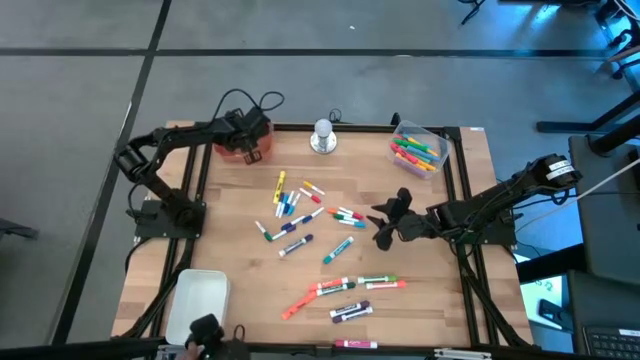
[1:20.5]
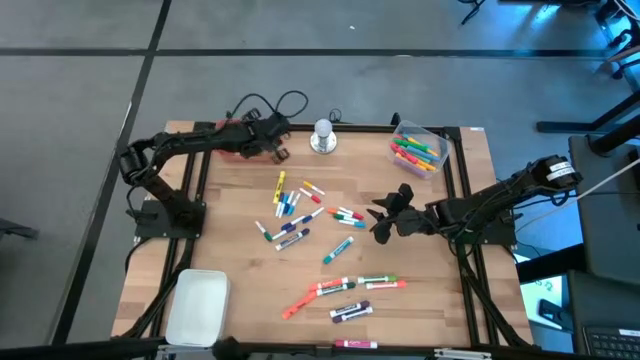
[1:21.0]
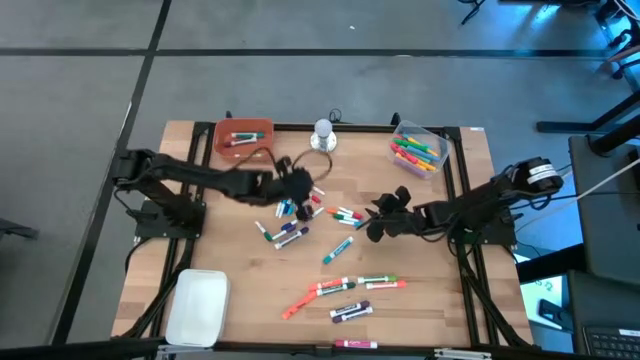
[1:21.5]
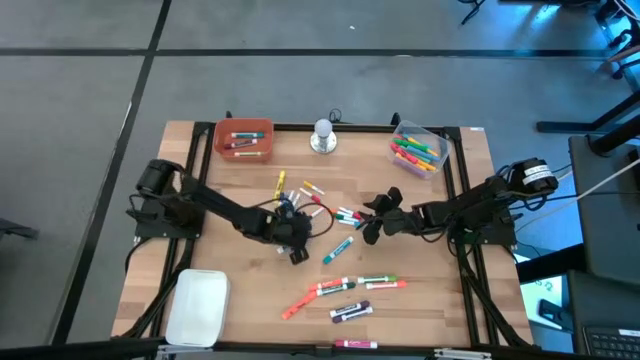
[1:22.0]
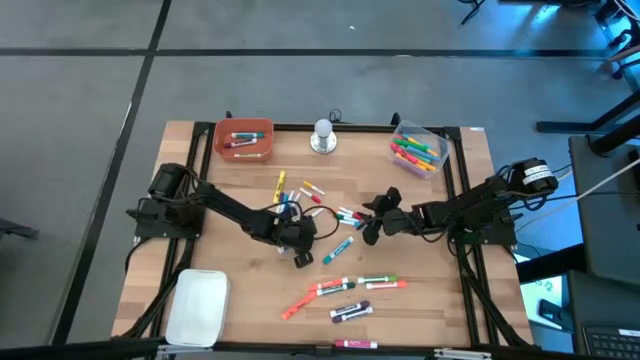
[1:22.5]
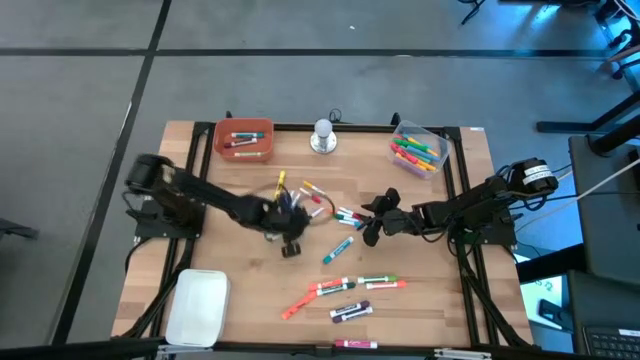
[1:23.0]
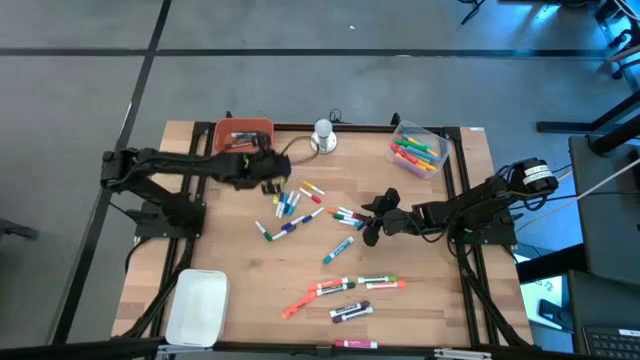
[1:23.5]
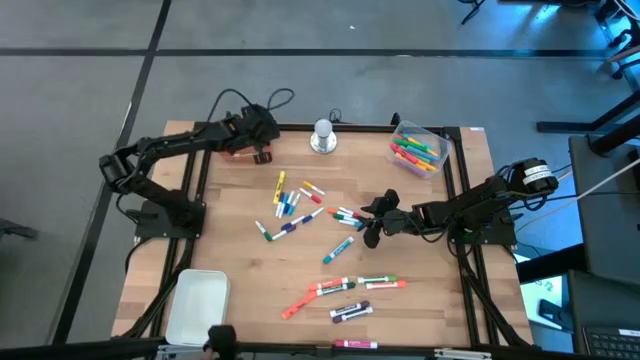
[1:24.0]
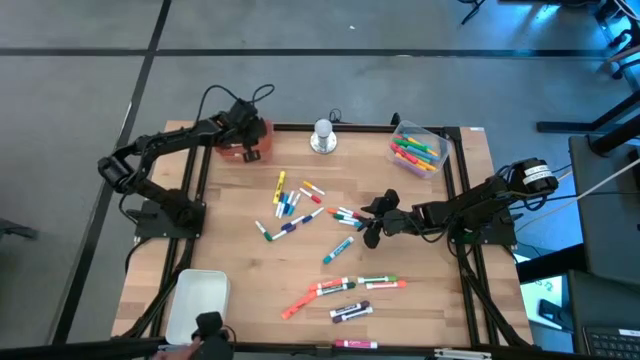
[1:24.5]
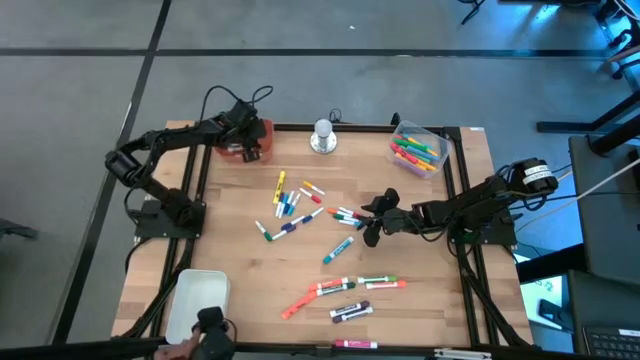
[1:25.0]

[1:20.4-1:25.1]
Task: Pick & Place Markers
Put the blue marker pen into the orange bin

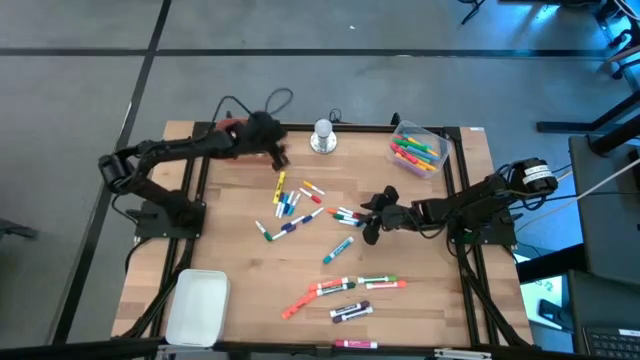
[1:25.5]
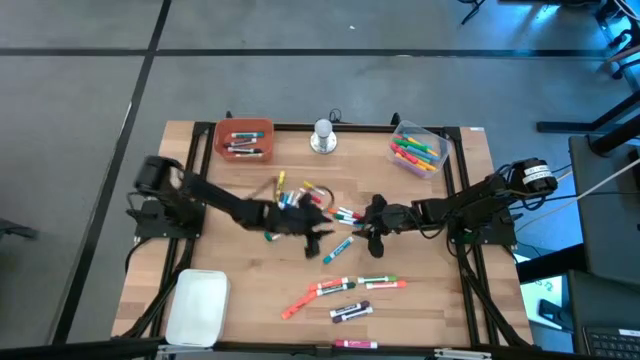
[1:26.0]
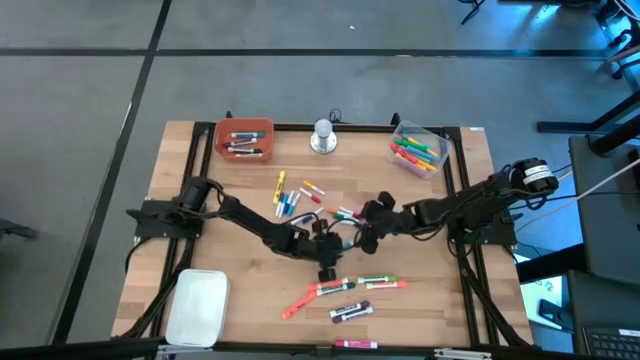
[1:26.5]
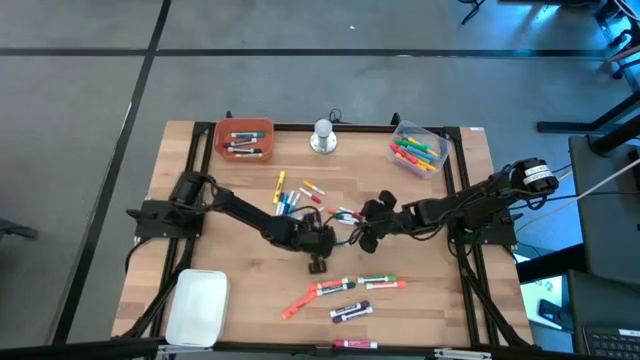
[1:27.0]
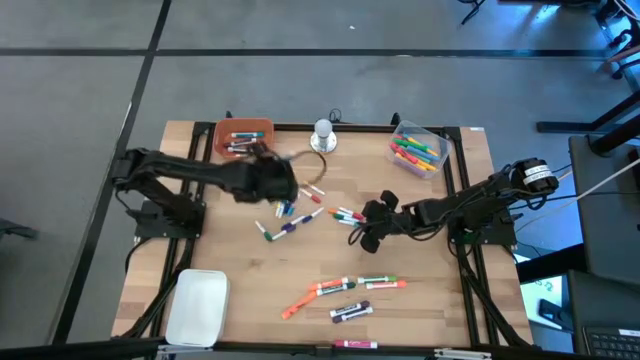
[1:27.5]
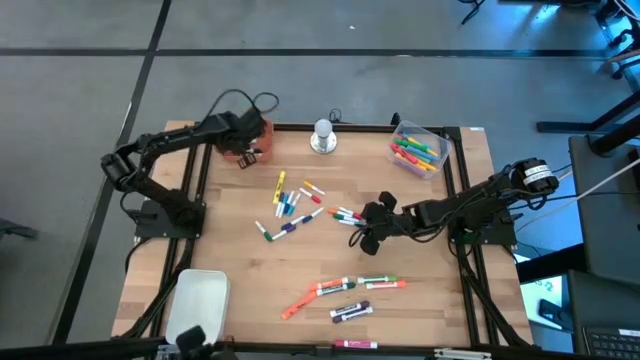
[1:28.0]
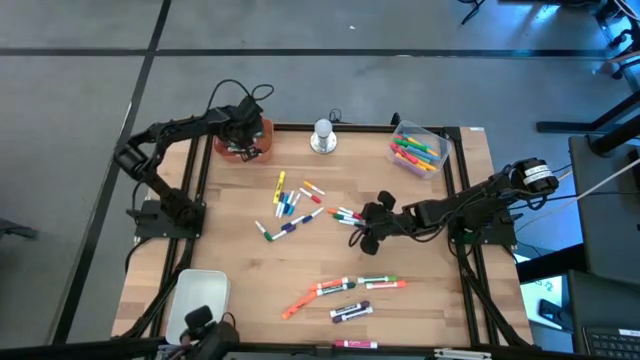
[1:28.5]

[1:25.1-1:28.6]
Put the light blue marker pen into the orange bin

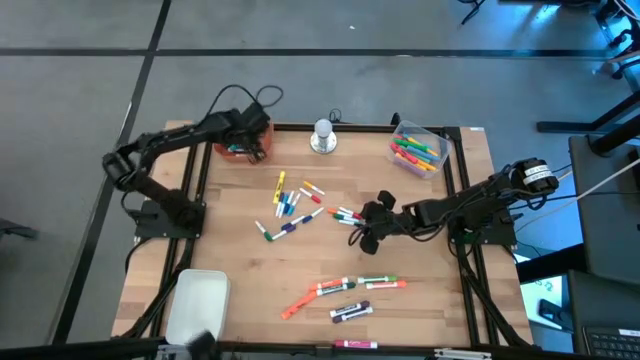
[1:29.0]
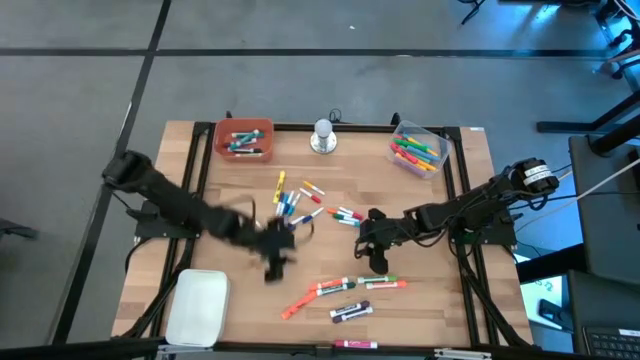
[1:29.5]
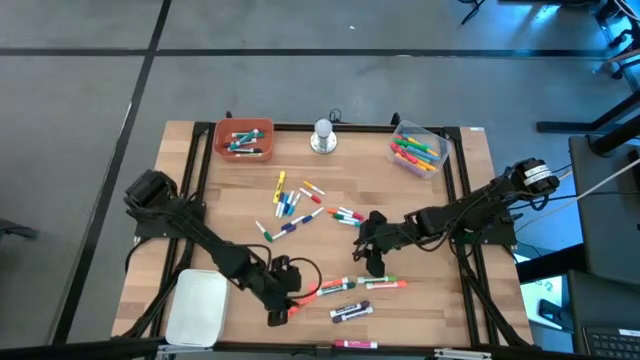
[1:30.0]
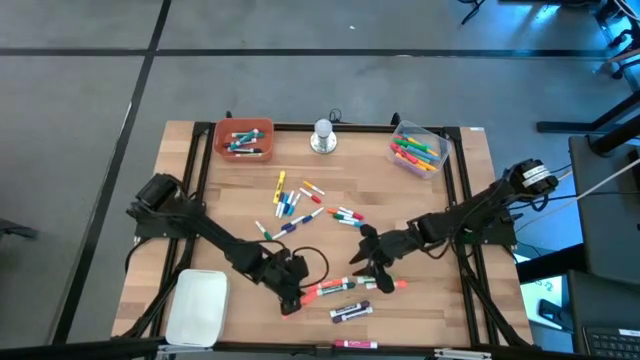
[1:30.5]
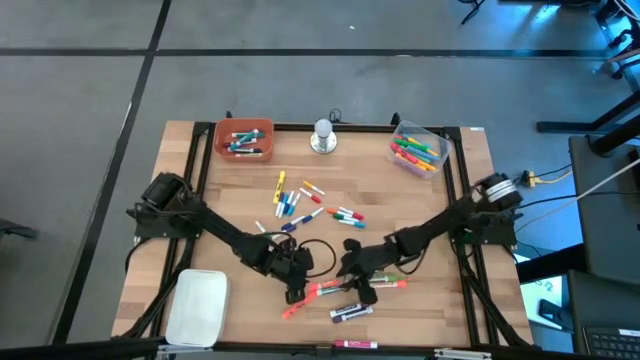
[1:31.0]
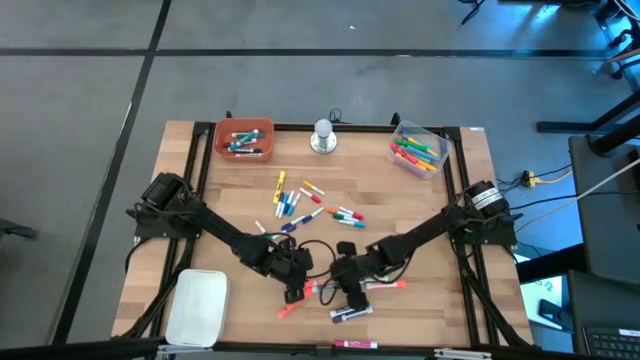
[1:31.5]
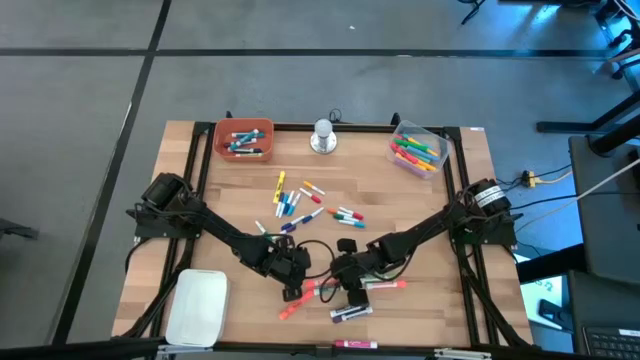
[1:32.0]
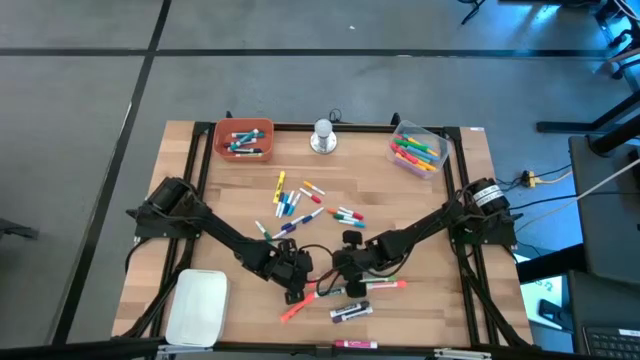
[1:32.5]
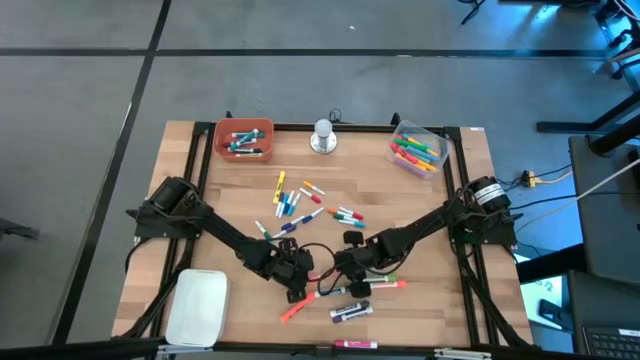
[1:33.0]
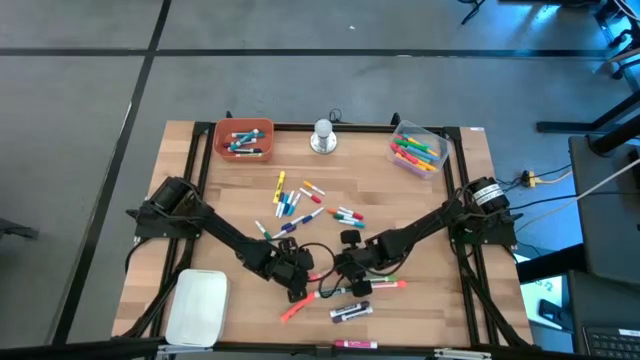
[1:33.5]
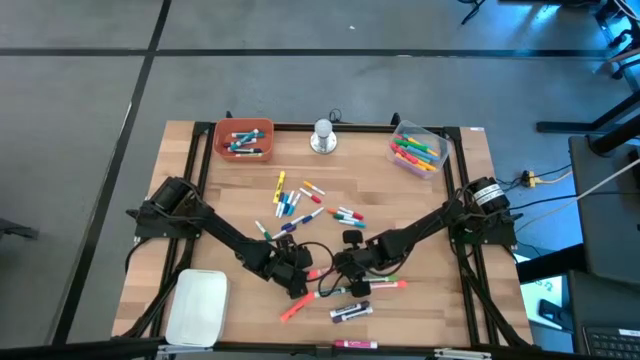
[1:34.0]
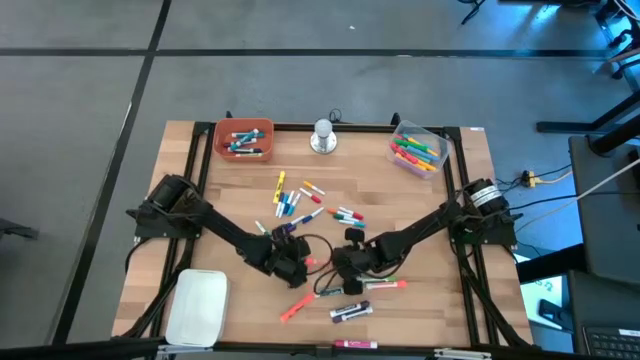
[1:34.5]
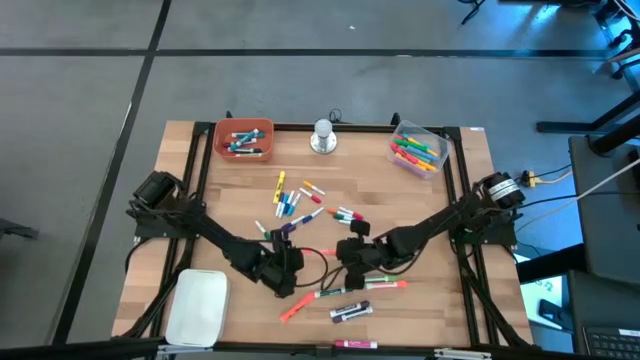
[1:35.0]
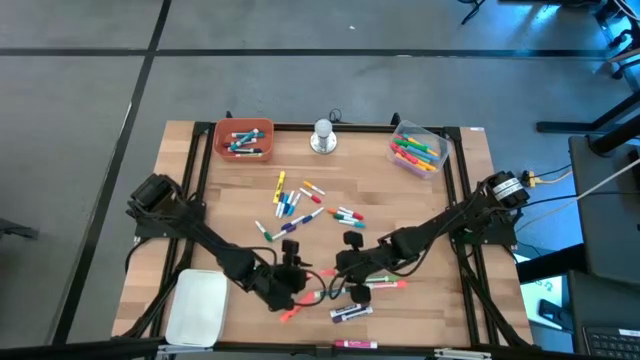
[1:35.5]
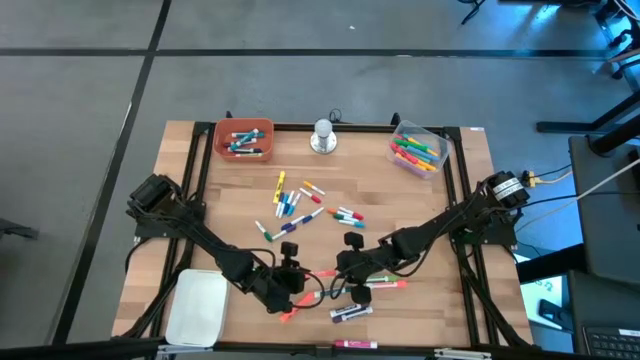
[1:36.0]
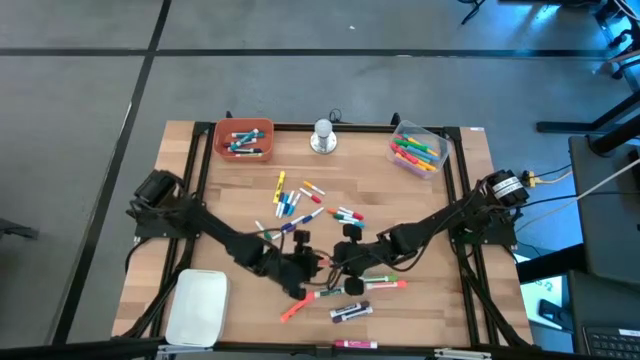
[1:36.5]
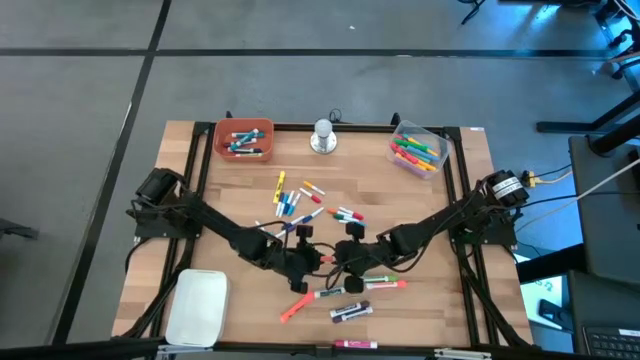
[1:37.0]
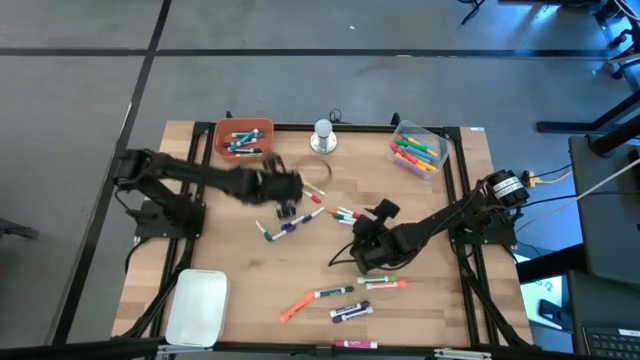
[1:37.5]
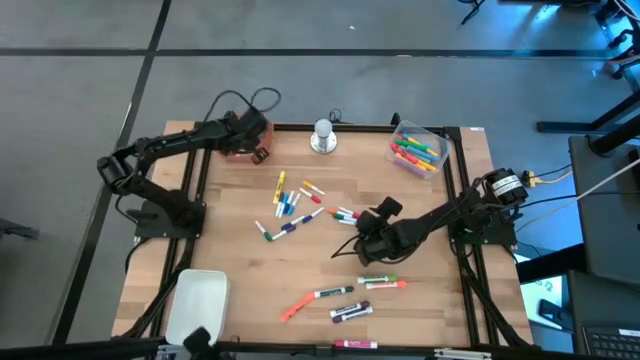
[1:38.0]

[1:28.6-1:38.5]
Put the orange marker pen into the orange bin

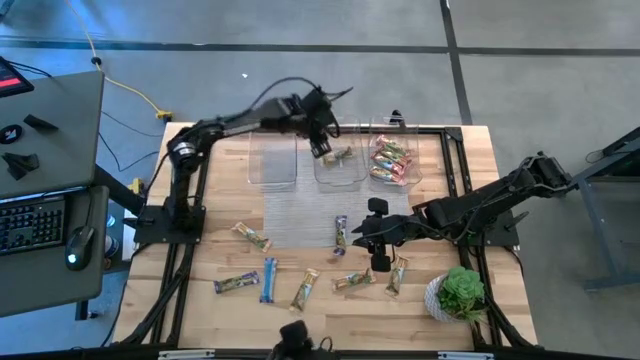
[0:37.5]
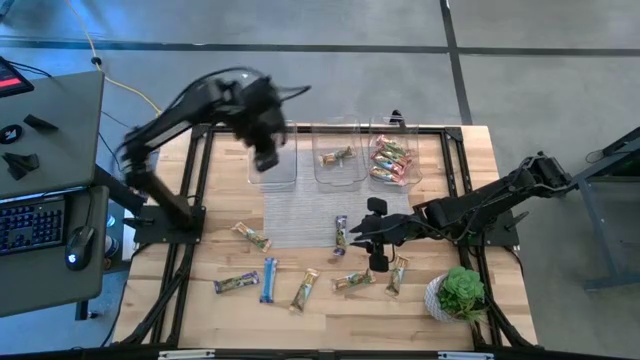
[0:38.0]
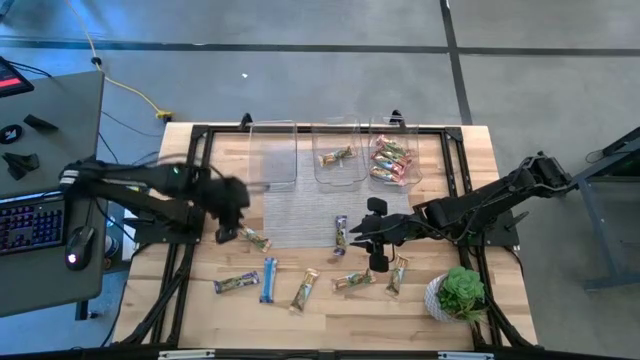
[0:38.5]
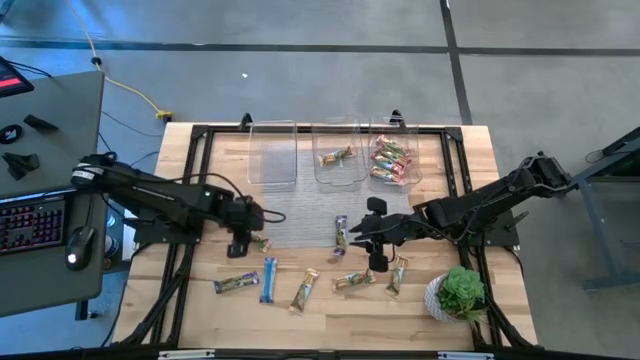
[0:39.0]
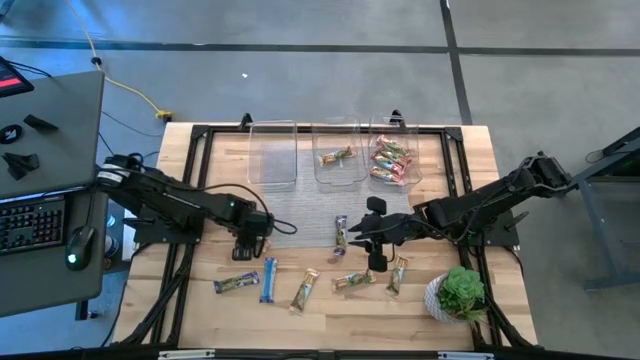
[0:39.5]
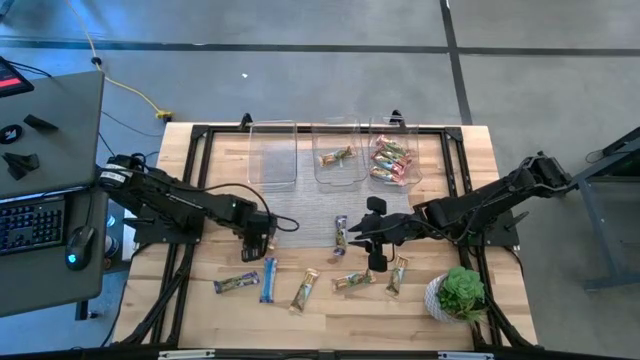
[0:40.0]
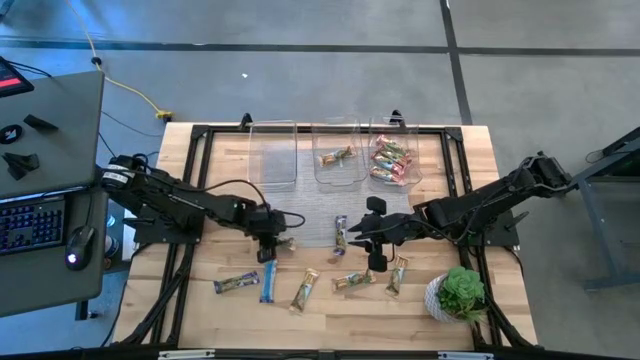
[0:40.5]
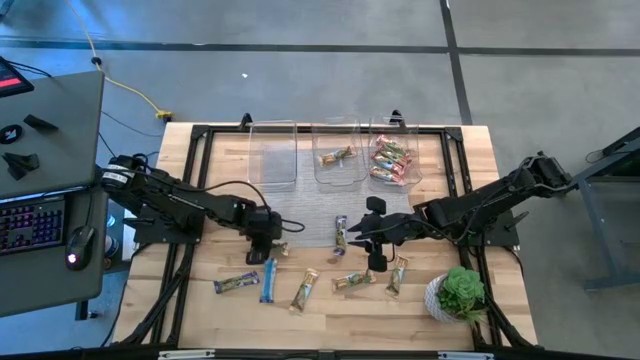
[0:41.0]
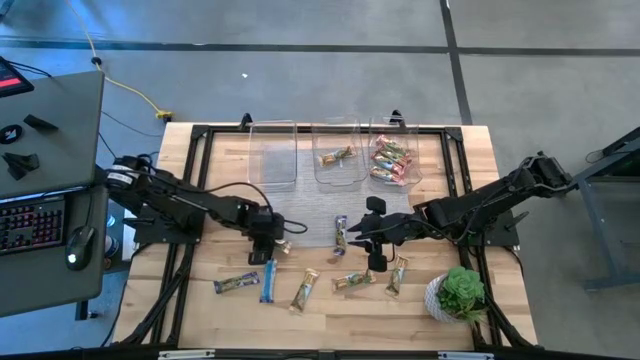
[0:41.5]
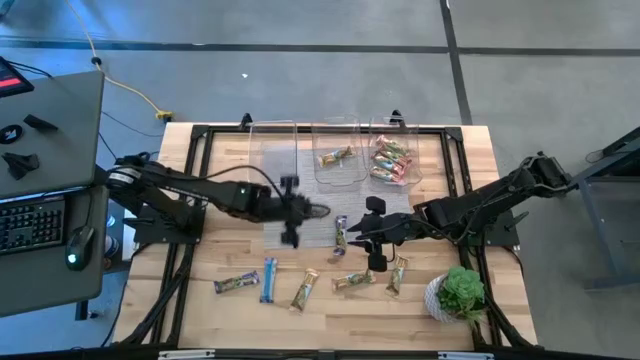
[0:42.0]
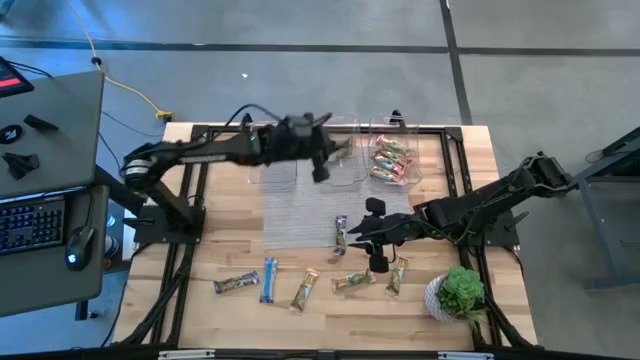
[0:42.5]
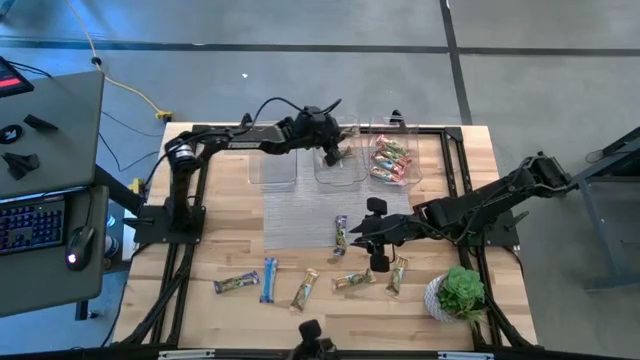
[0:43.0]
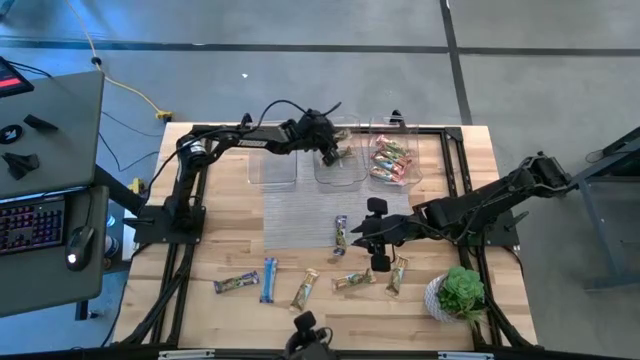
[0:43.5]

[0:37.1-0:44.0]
Task: Pick and place Granola Bars by type
Put the orange granola bar into the middle transparent bin
